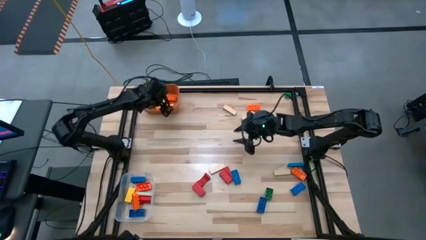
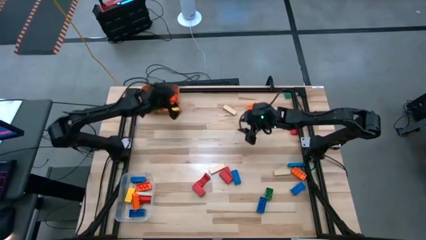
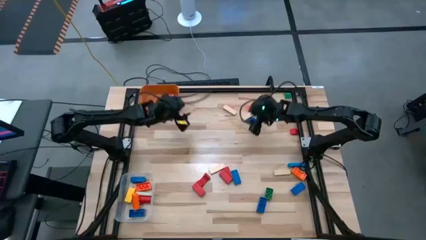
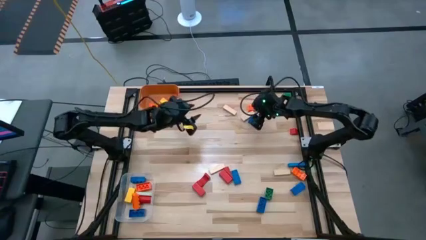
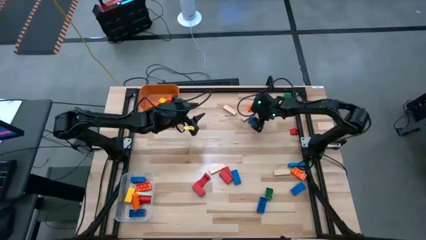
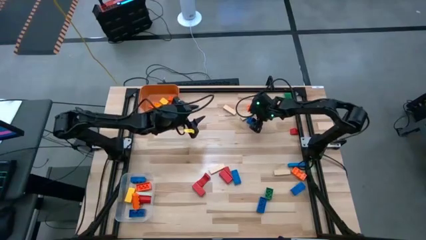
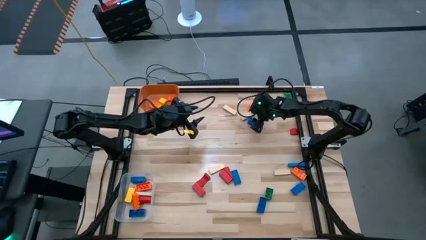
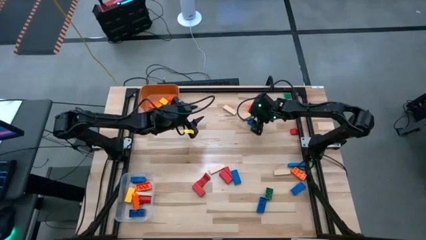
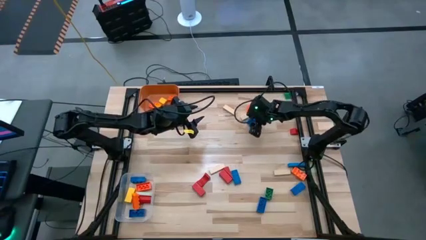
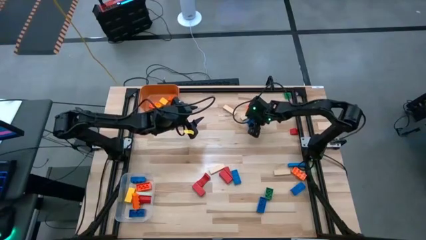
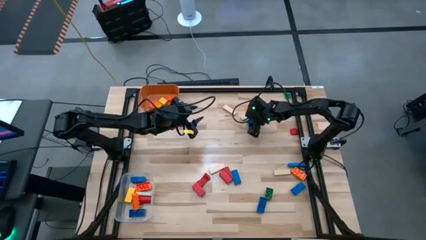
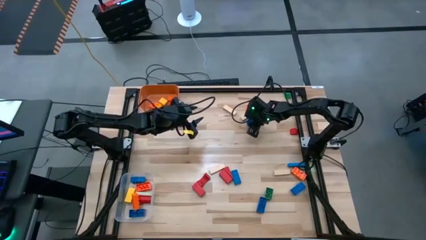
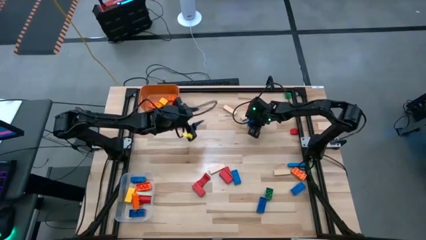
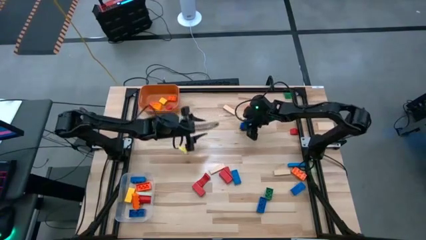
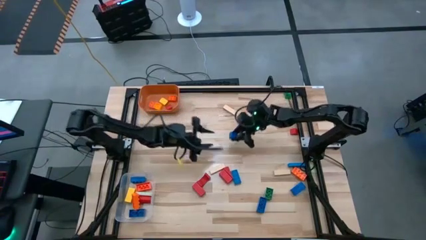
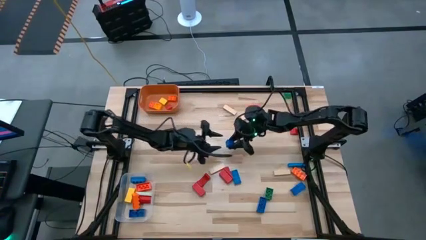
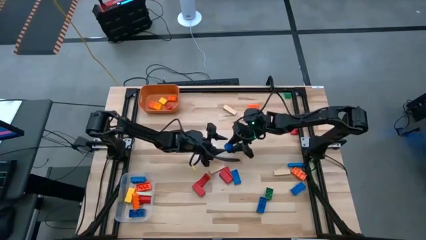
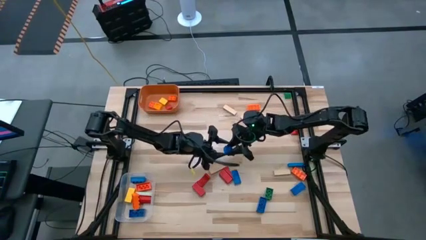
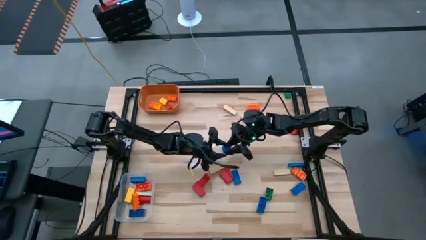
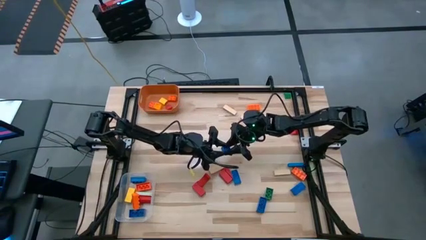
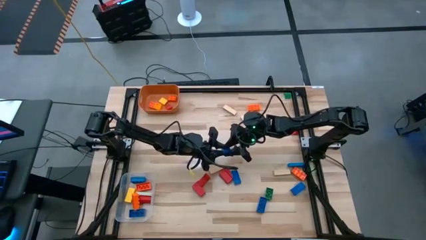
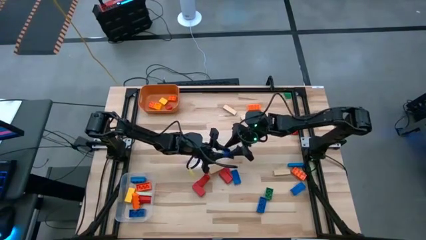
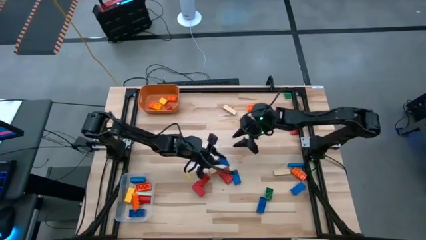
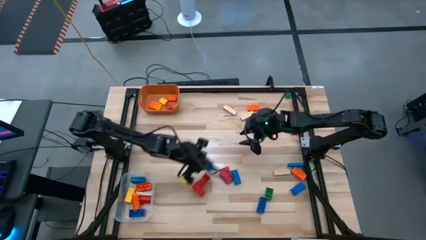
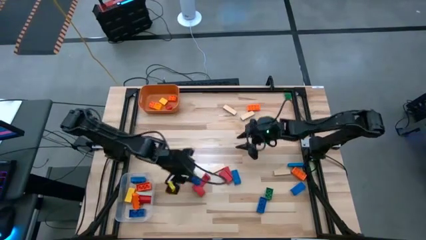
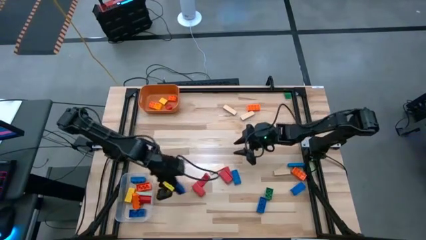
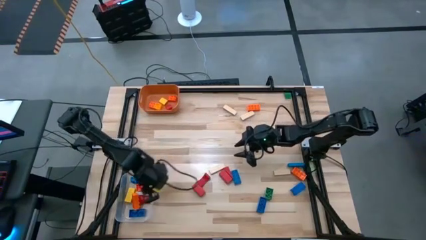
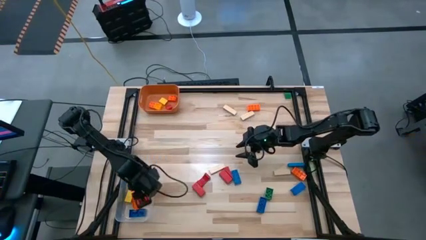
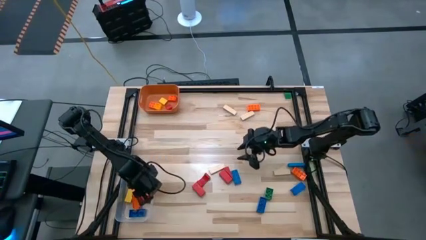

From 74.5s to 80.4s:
Task: Sort blocks by size
Put the small blue game piece into the orange bin

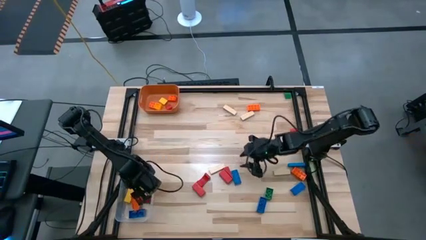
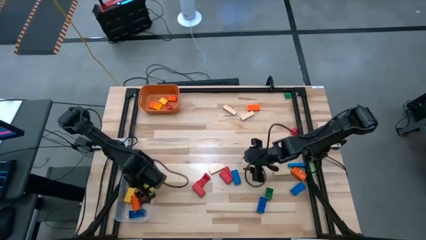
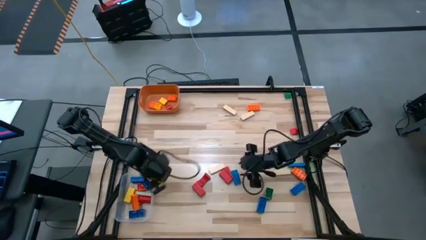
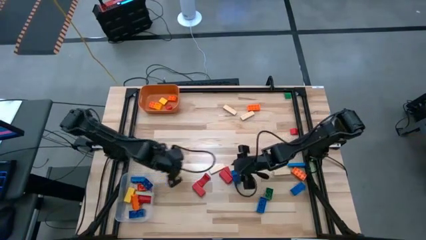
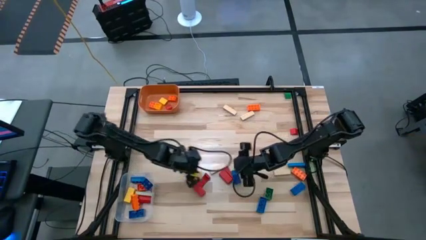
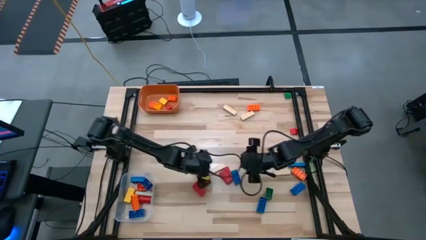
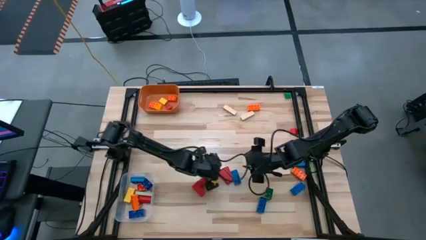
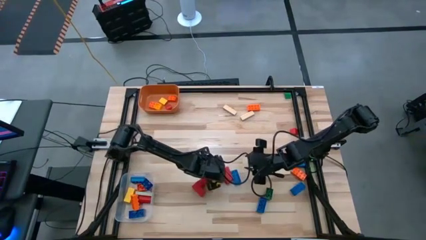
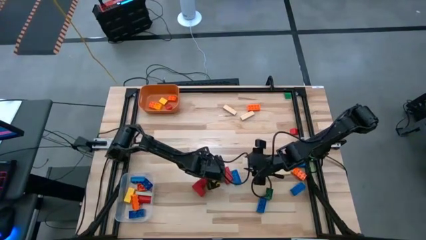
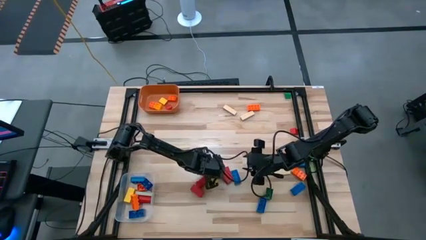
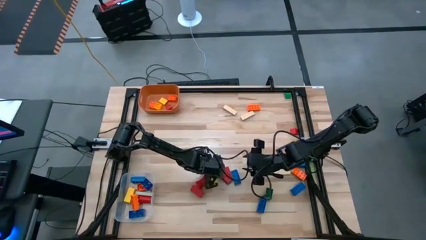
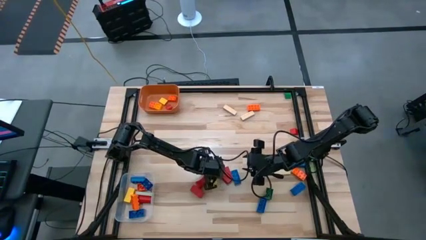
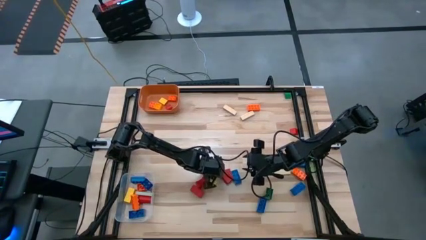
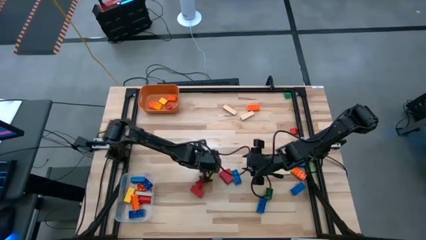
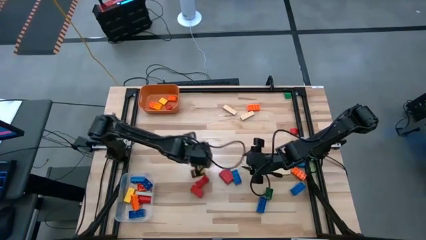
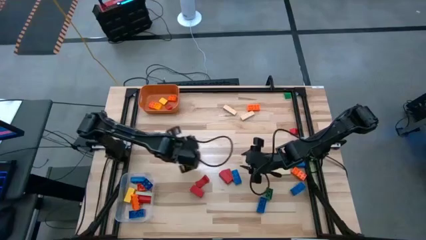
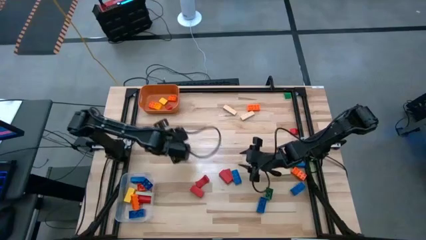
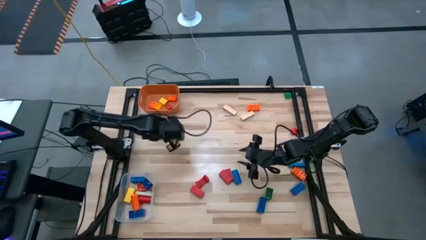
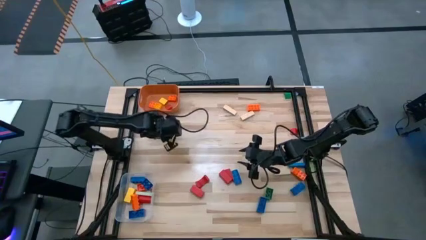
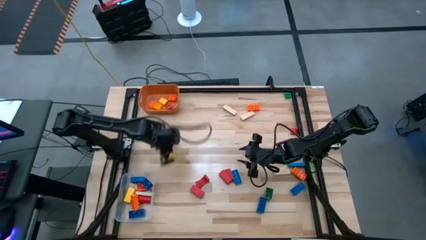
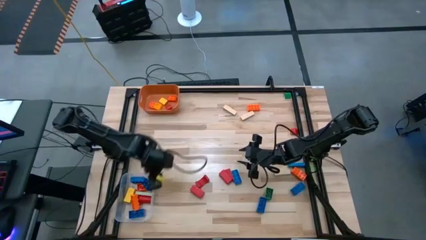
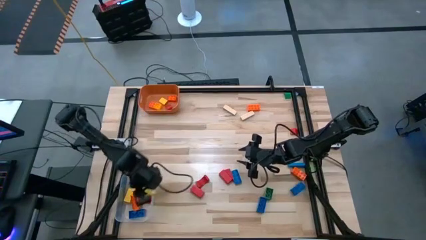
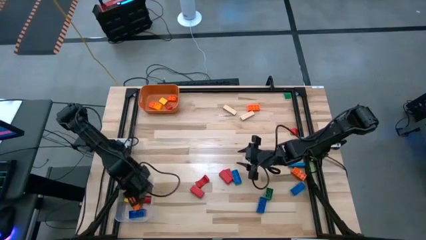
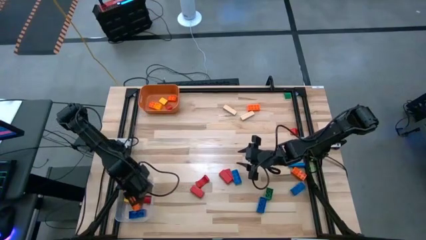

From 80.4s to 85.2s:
Put the large brown block into the transparent bin

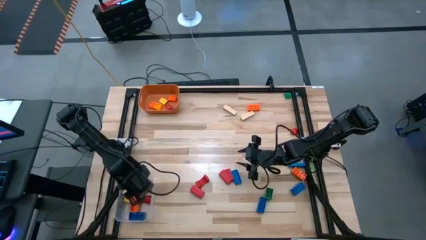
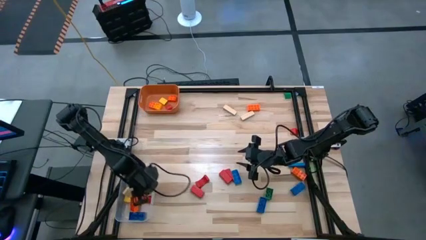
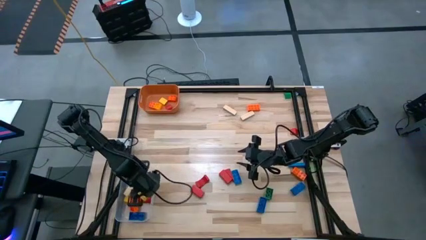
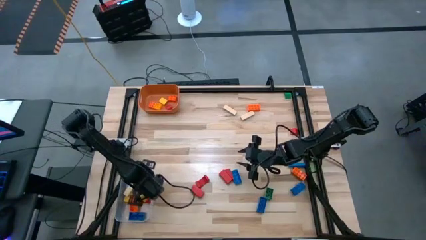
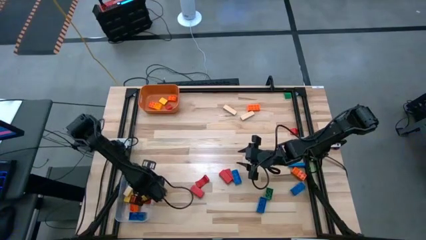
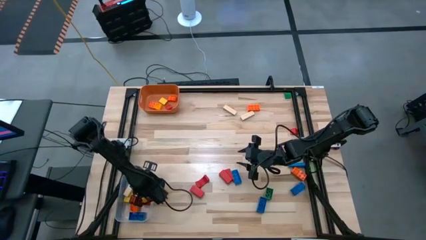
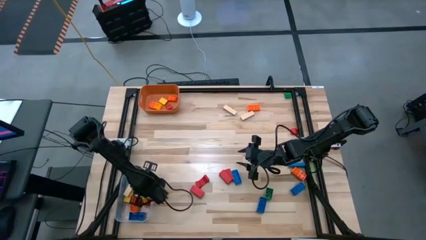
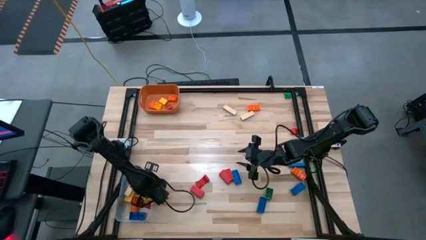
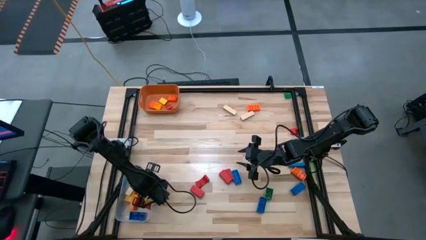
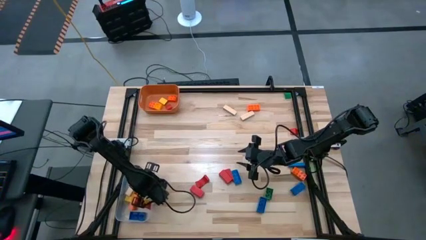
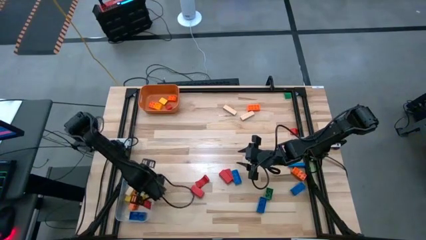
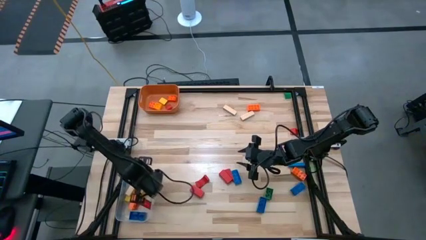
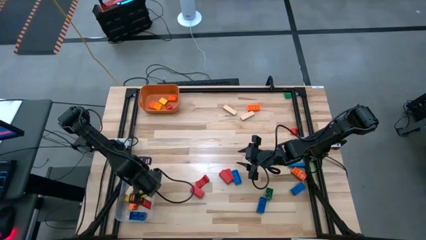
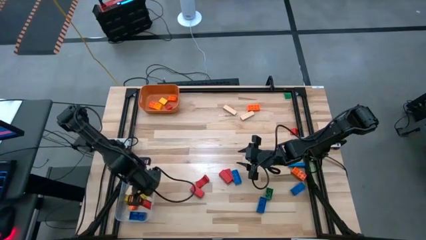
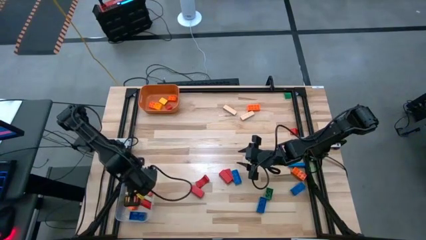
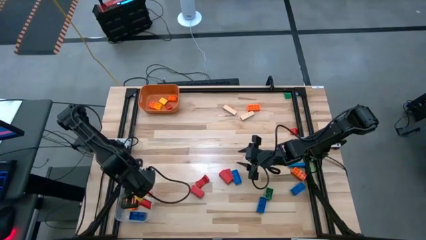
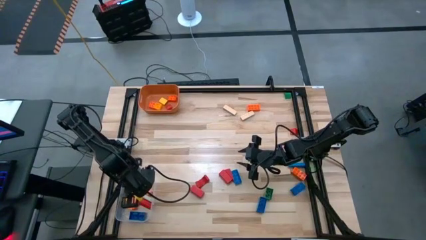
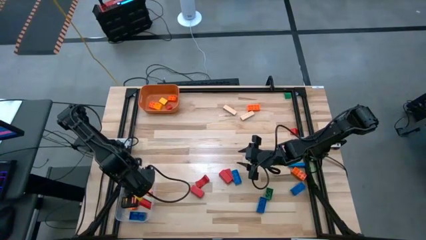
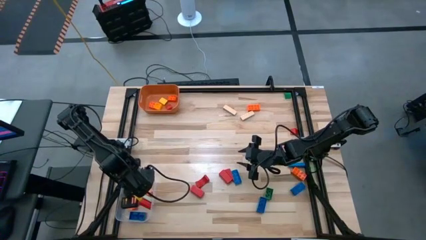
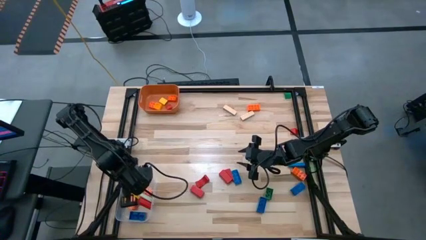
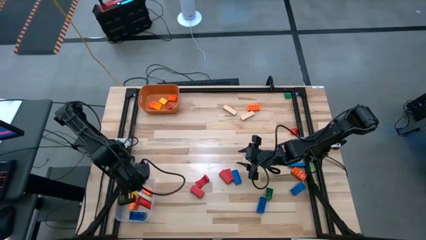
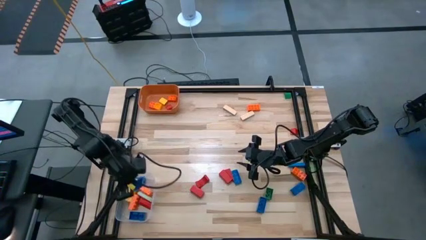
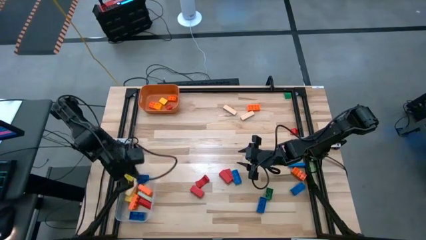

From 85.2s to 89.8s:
Put the small blue game piece into the orange bin
